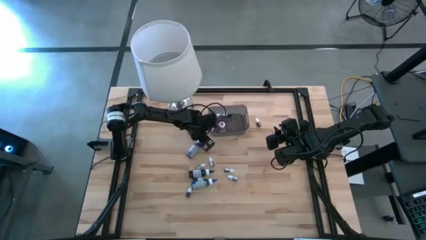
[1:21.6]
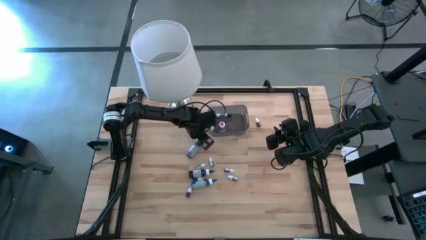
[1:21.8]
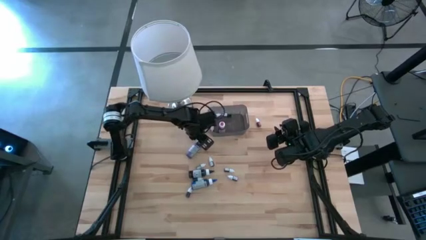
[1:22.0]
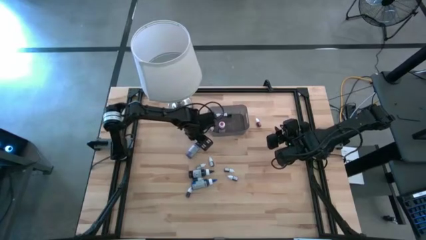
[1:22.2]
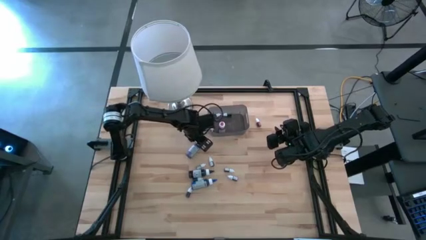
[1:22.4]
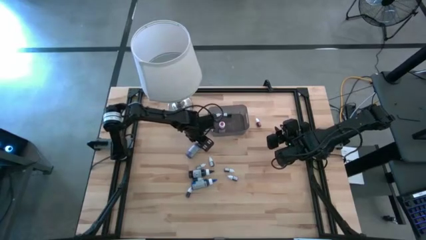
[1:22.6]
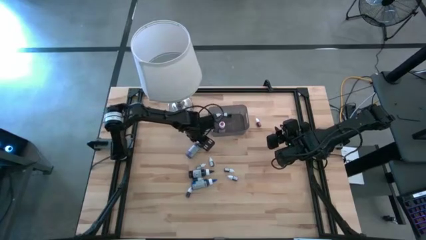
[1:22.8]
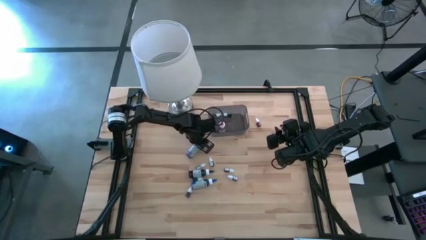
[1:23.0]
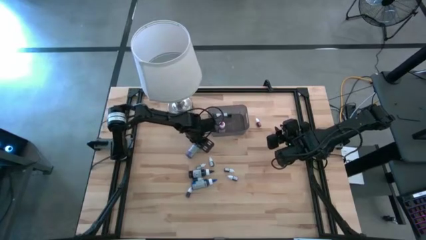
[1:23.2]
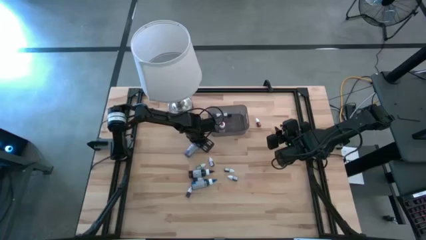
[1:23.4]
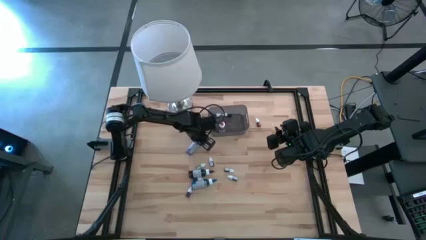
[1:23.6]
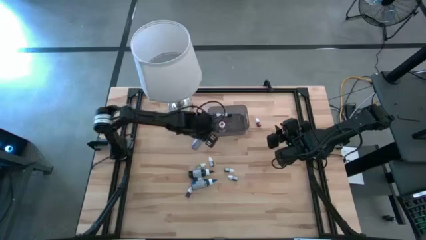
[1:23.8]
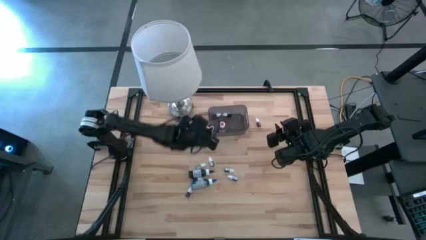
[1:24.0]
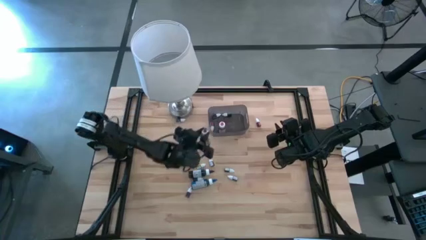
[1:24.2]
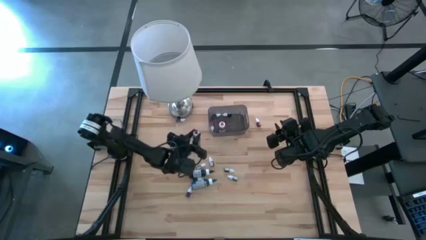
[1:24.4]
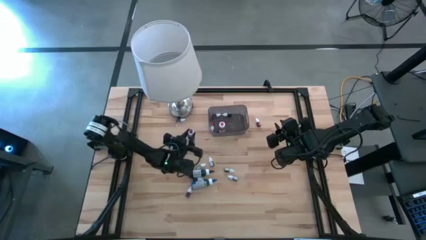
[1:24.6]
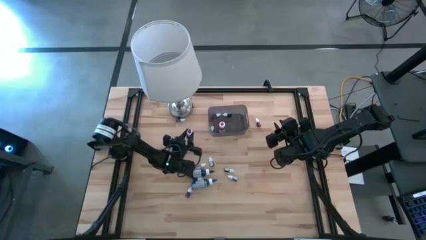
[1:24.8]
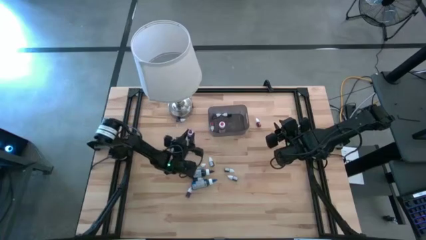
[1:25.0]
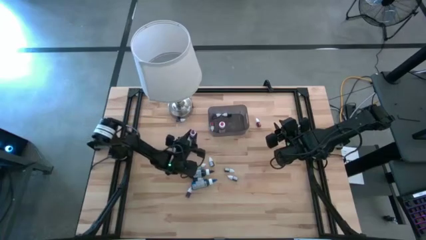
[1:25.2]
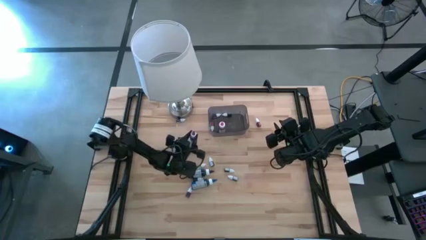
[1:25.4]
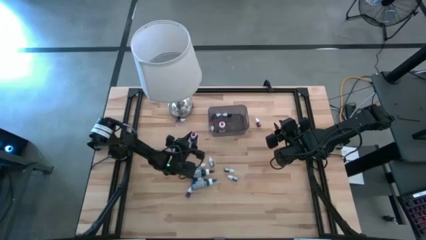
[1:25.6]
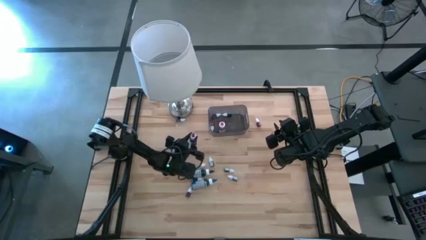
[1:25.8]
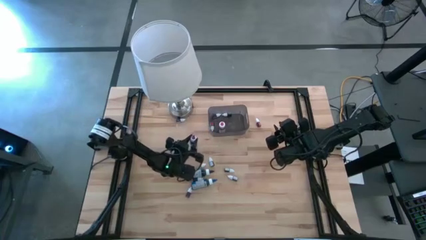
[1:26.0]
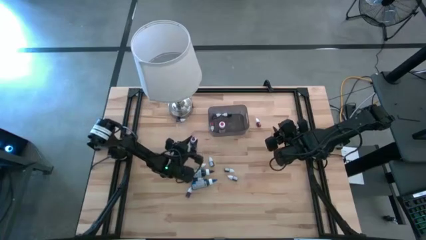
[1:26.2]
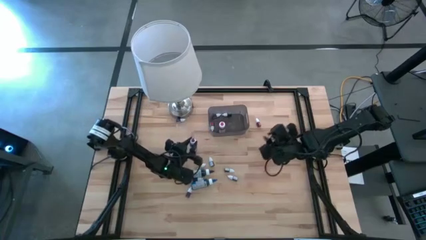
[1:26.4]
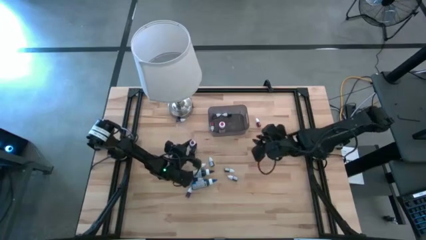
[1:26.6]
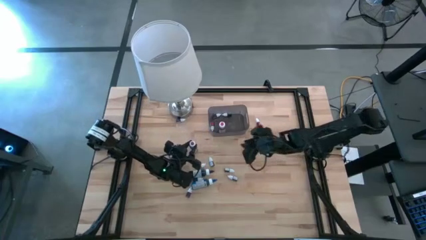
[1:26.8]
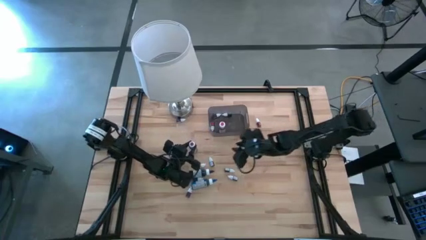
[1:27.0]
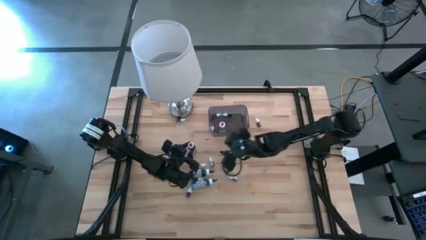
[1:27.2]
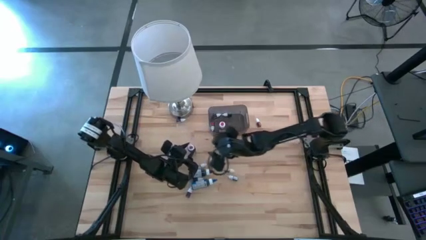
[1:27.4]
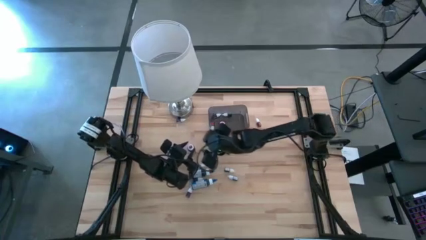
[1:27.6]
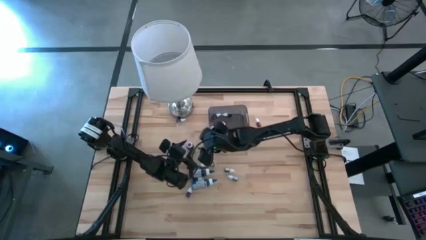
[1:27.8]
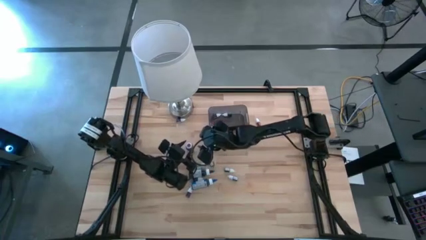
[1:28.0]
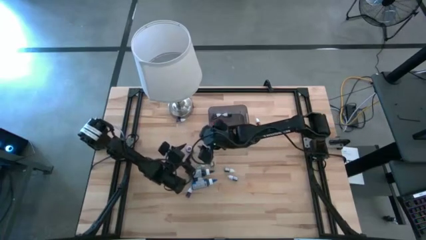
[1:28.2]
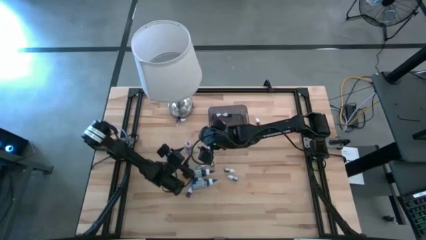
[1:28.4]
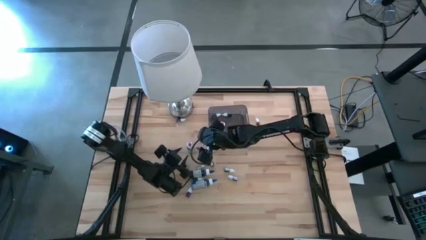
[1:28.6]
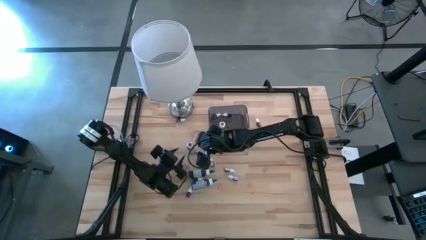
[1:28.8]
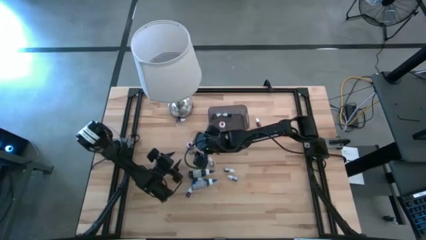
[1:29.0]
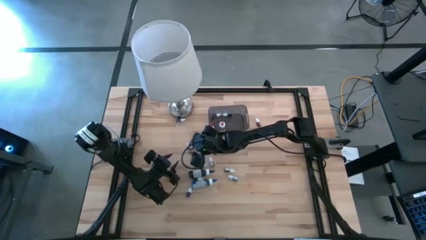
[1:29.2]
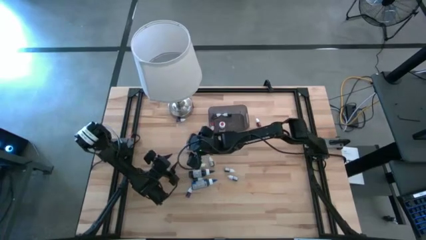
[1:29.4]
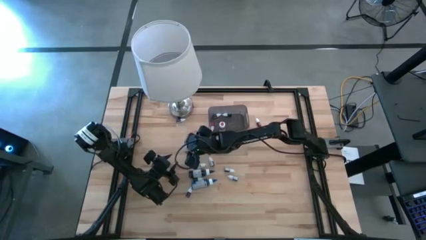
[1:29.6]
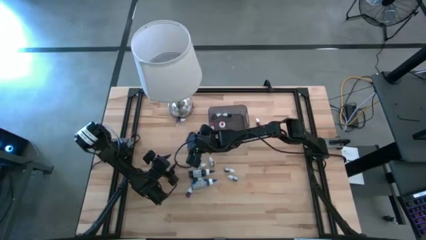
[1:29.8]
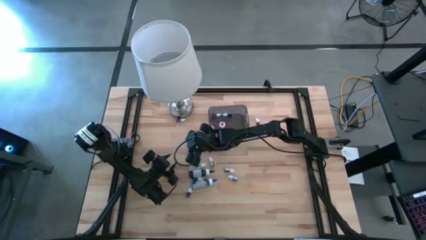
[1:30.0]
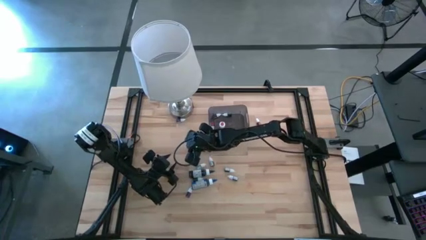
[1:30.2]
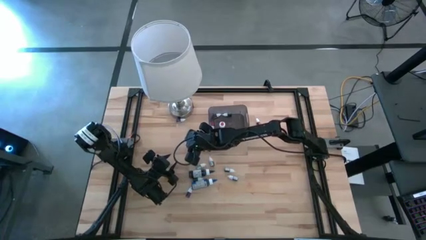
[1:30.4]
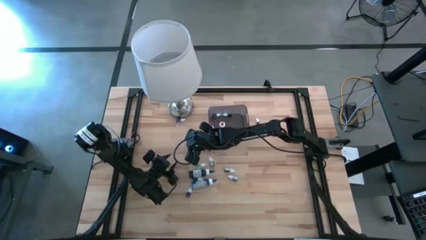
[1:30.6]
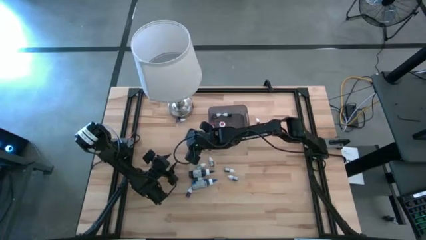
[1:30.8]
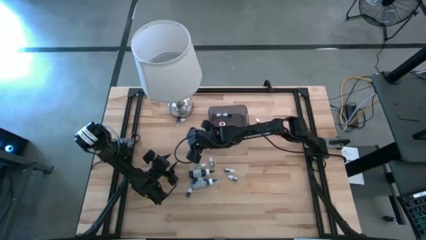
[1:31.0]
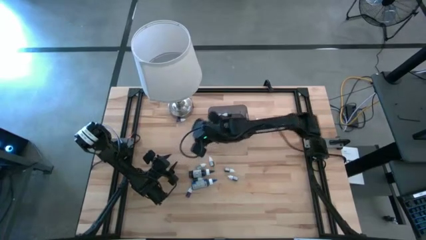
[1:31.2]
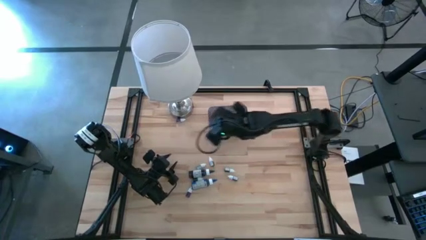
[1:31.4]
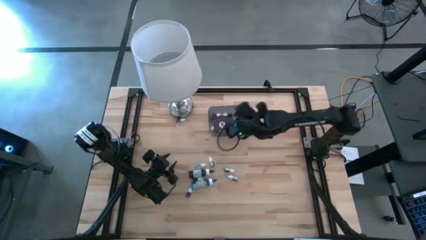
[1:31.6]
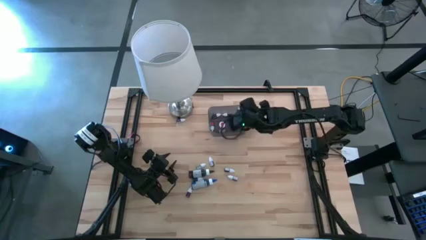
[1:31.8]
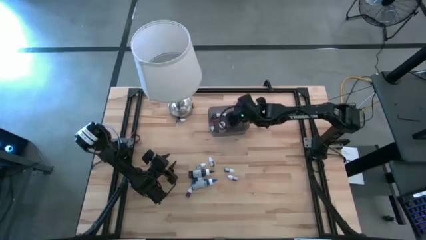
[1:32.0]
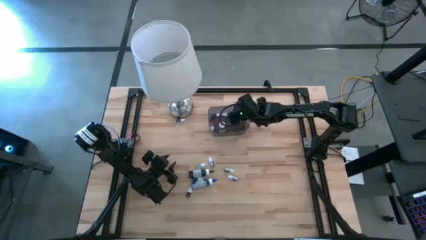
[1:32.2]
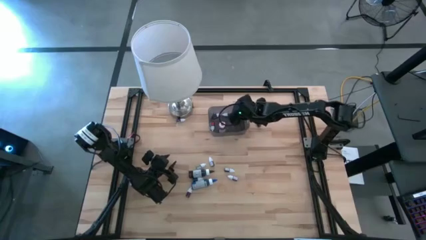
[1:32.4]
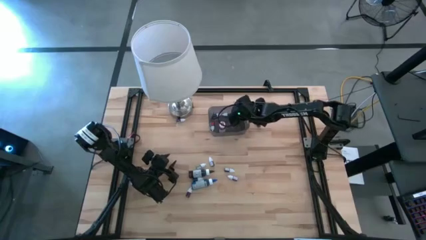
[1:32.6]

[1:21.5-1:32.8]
Task: Pick & Place food coloring
Put the large purple food coloring bottle into the bin
